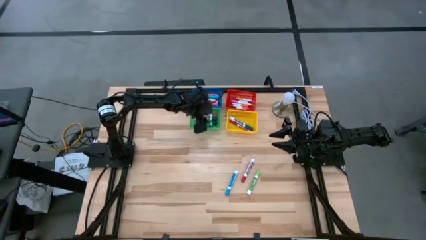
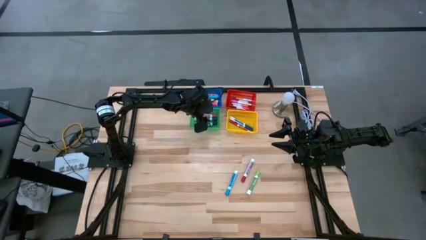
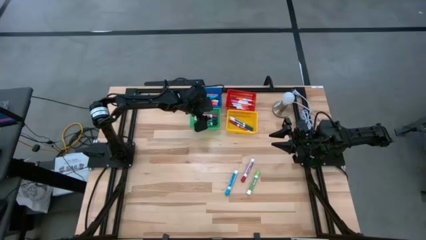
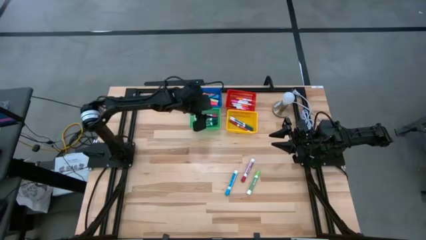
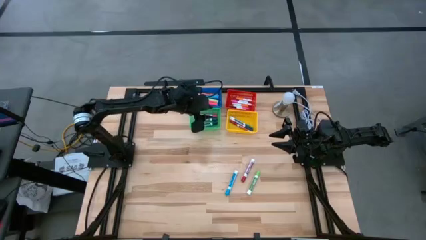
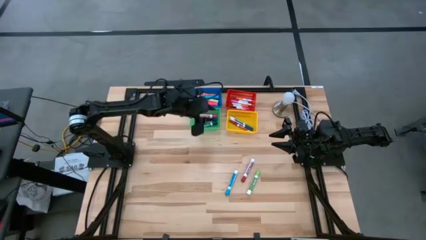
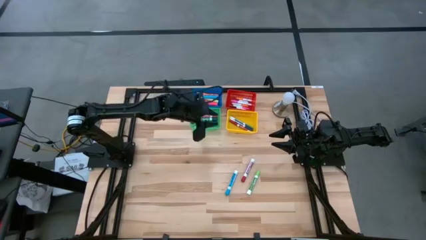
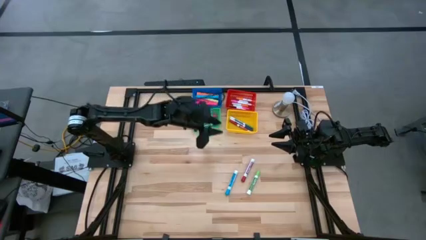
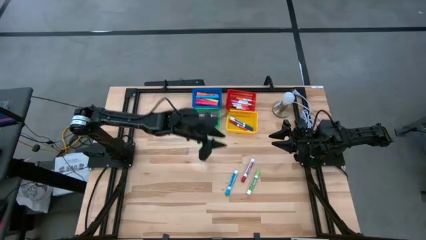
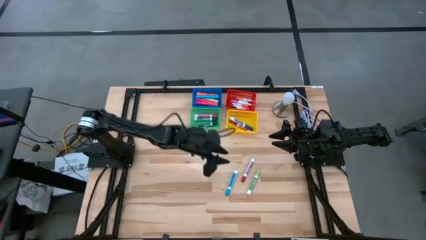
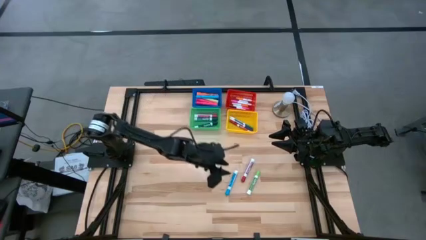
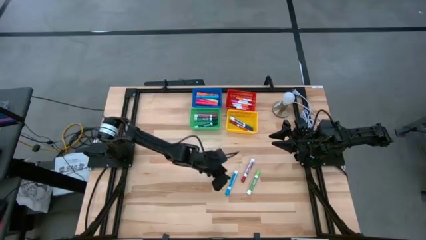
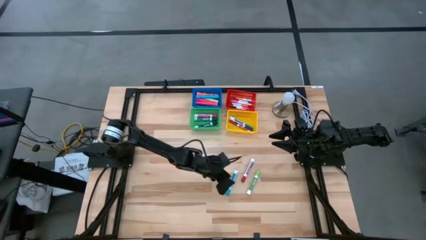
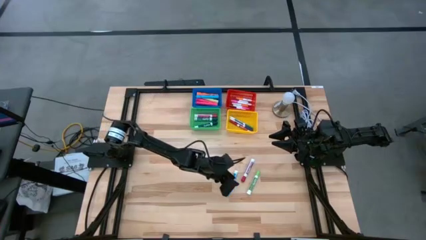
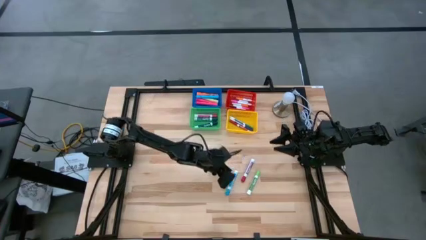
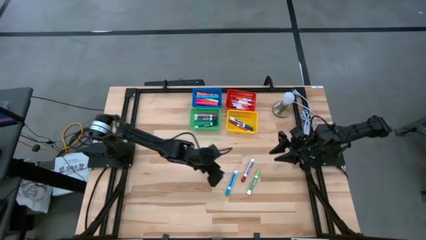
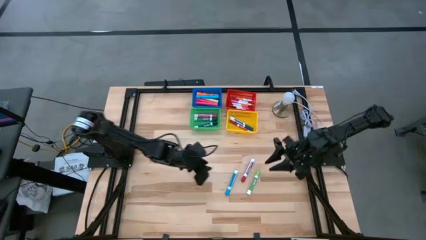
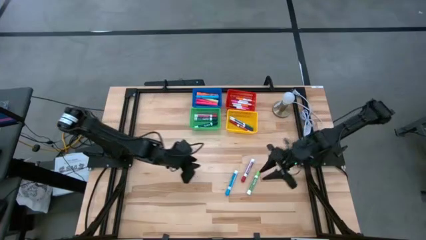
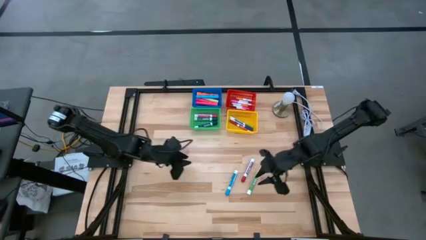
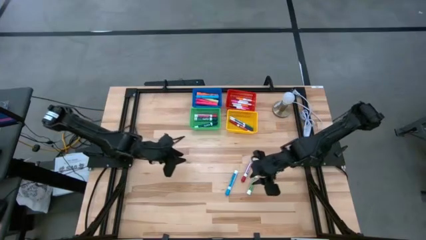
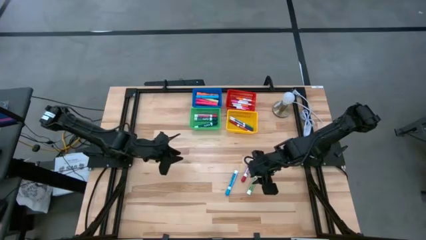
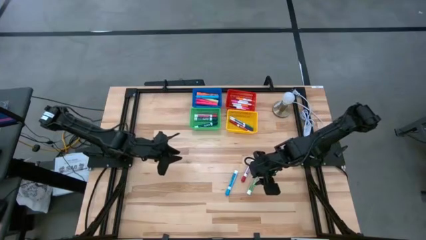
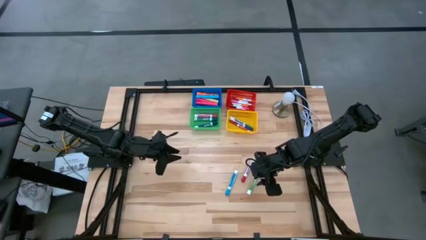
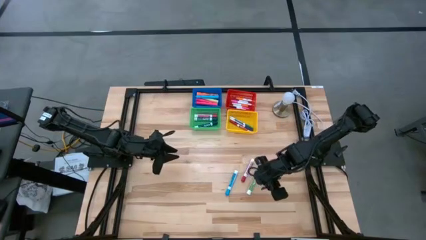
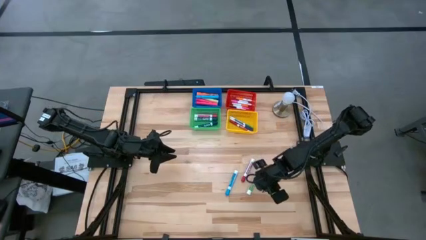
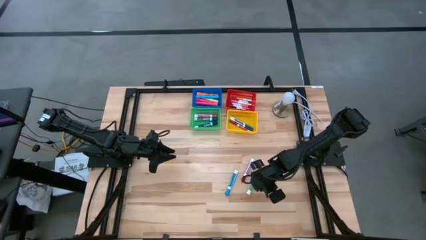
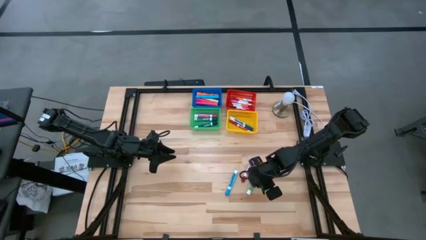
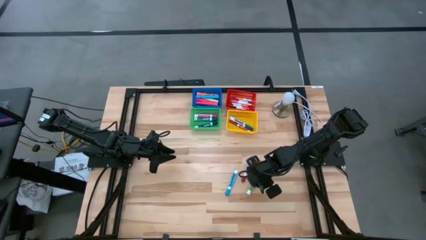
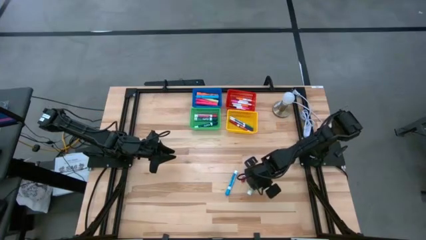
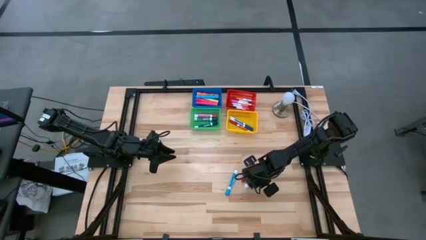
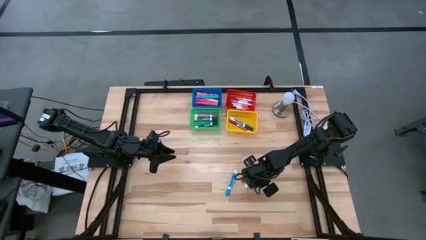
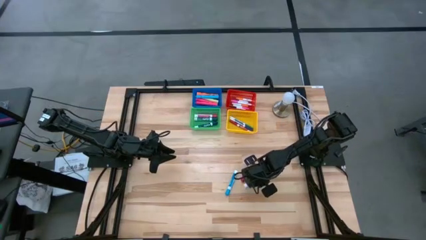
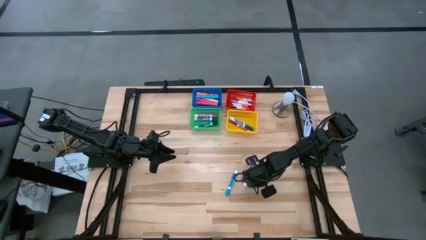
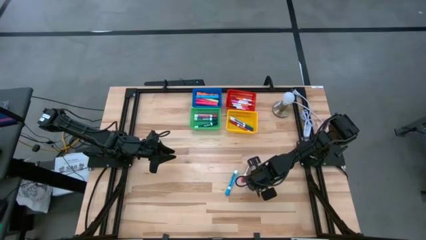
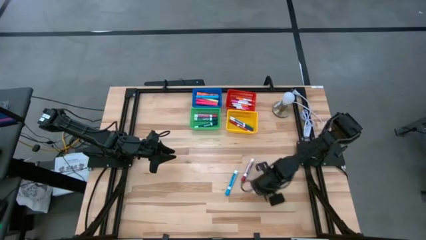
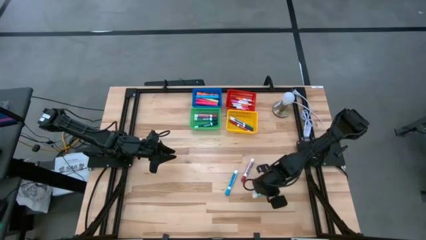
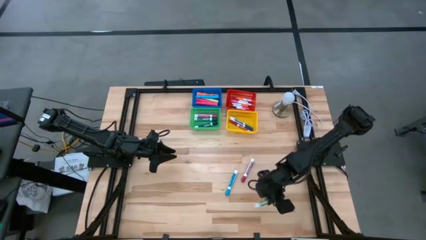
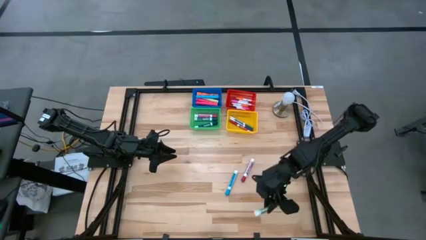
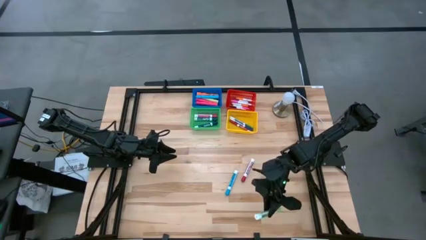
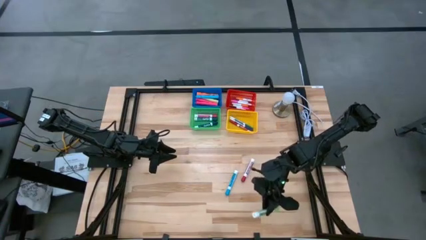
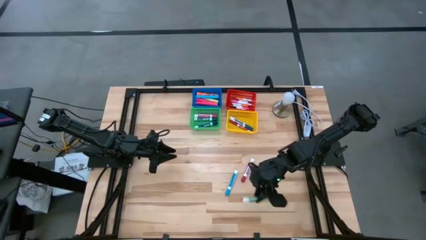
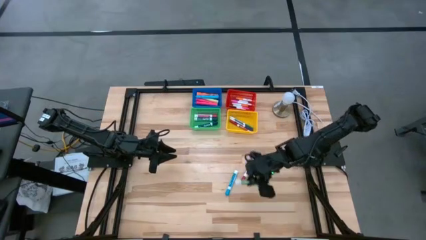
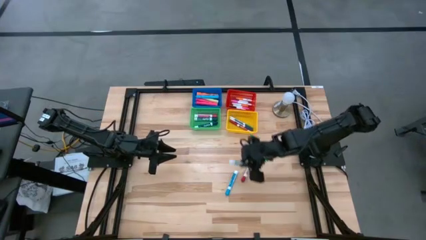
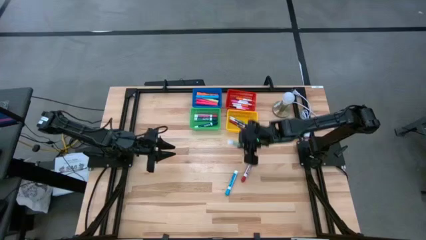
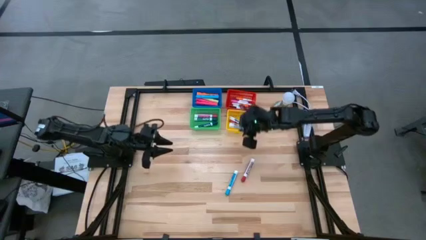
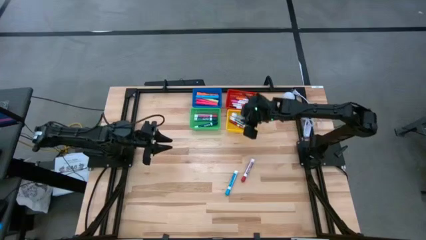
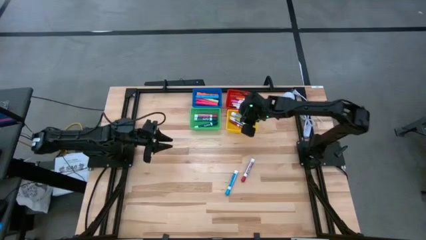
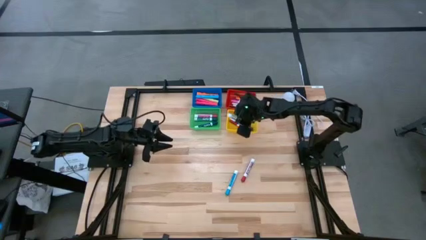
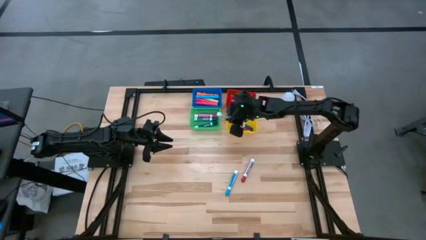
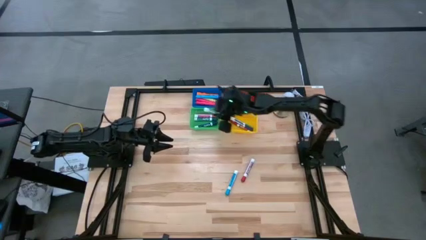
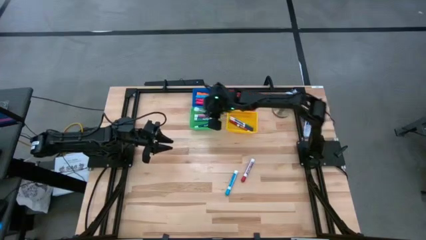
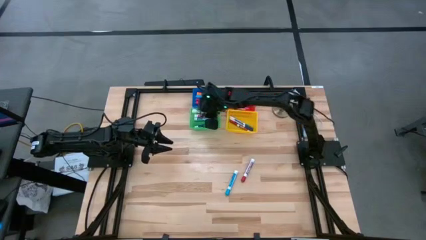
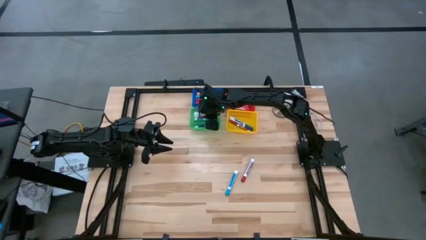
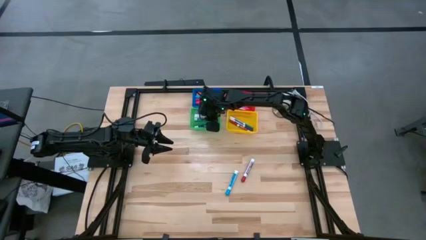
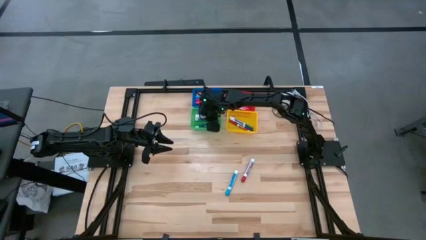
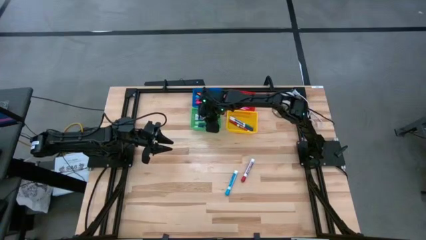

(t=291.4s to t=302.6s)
Task: Pick & Place Markers
Put the large green marker into the green basket
